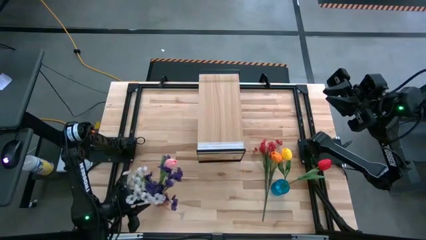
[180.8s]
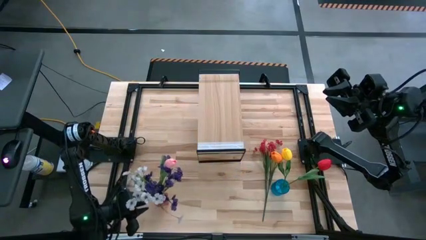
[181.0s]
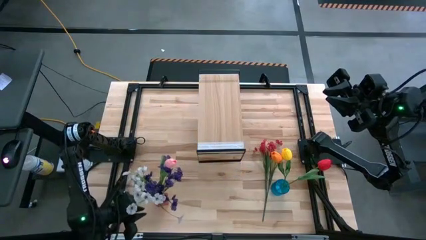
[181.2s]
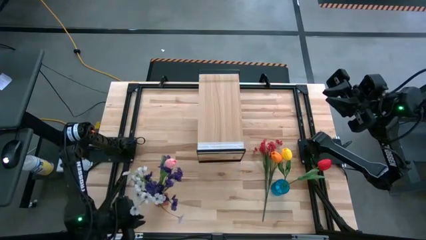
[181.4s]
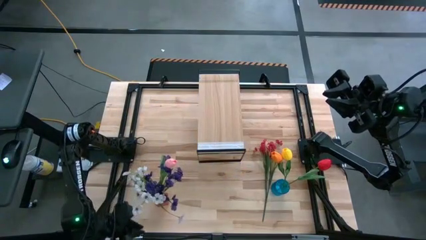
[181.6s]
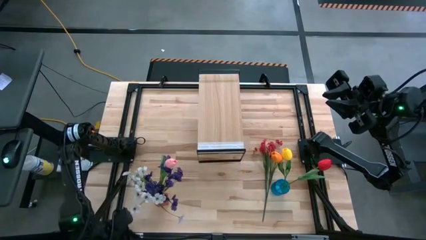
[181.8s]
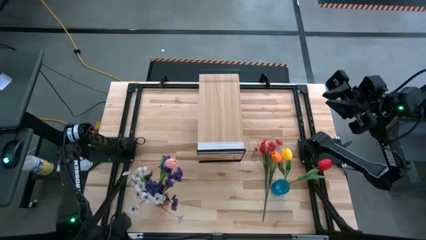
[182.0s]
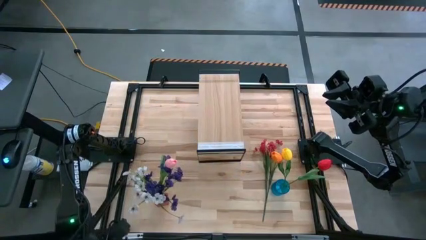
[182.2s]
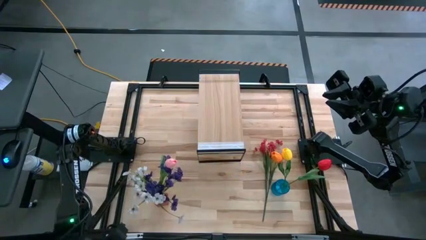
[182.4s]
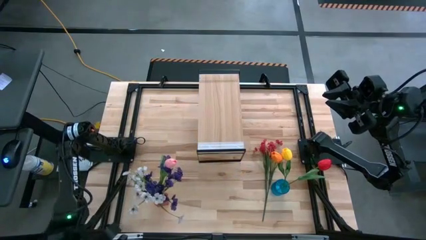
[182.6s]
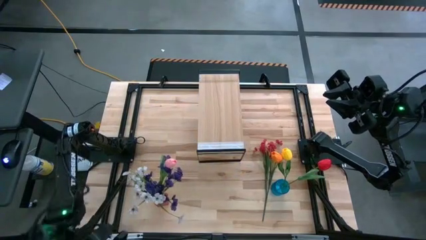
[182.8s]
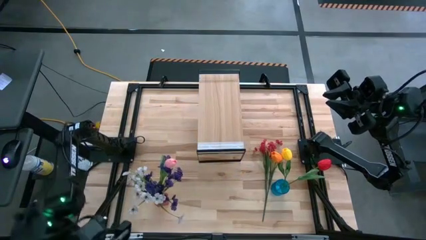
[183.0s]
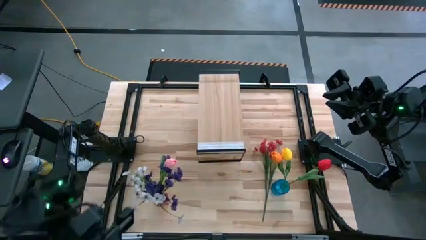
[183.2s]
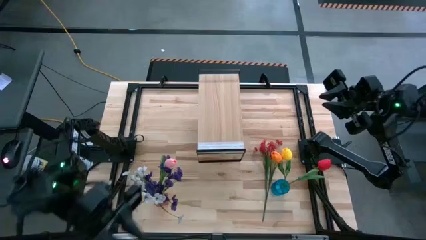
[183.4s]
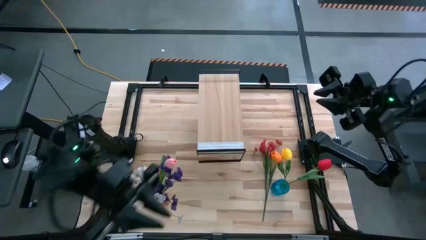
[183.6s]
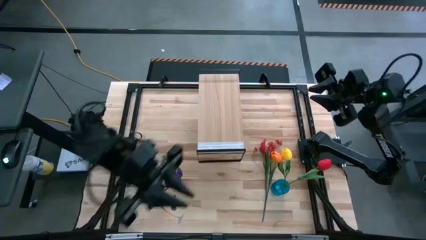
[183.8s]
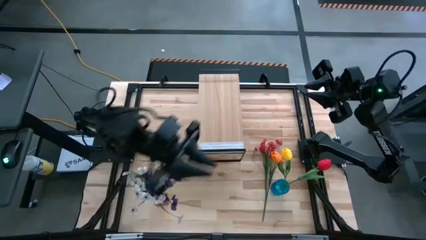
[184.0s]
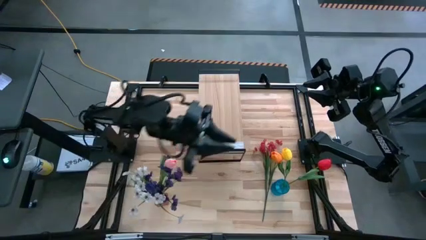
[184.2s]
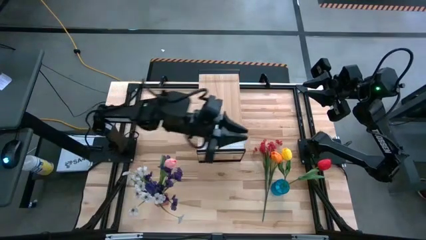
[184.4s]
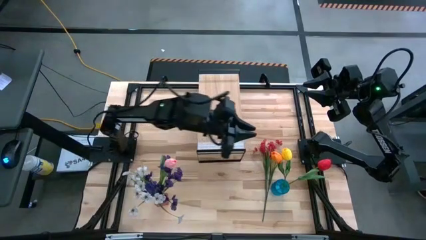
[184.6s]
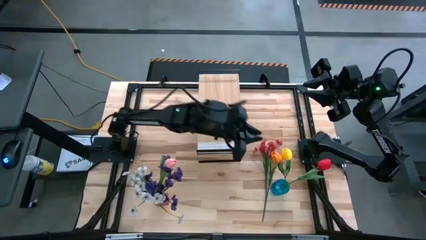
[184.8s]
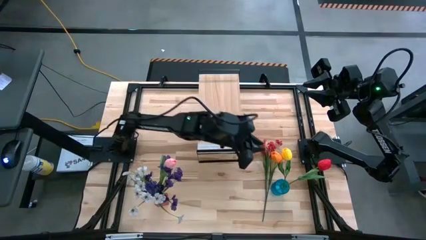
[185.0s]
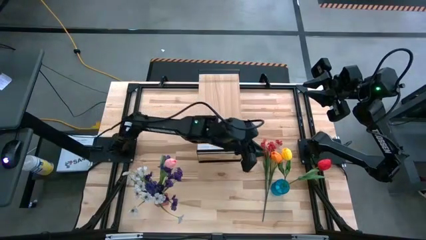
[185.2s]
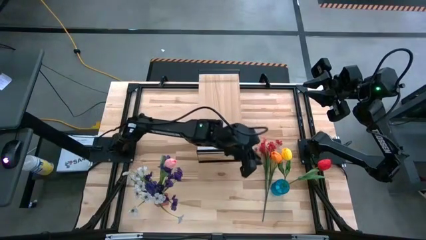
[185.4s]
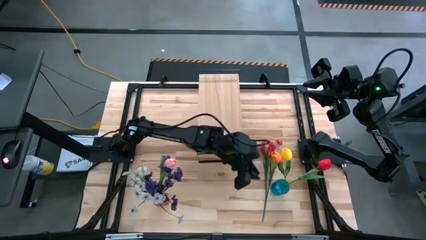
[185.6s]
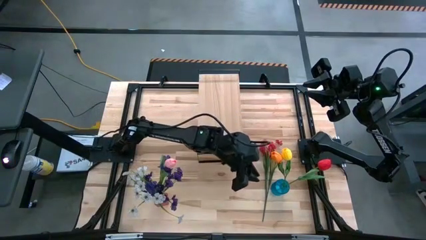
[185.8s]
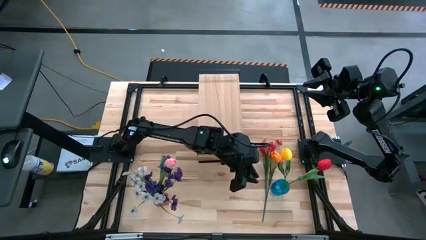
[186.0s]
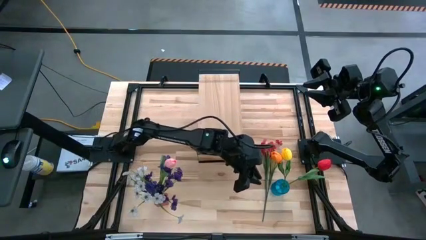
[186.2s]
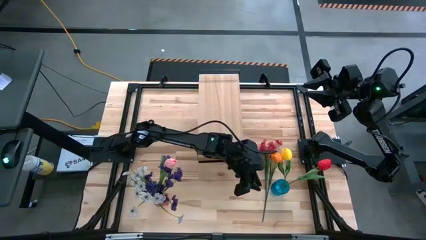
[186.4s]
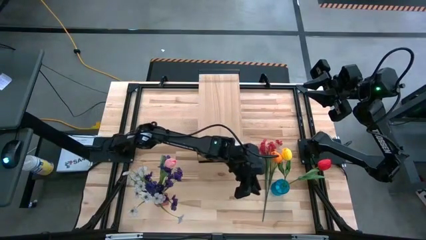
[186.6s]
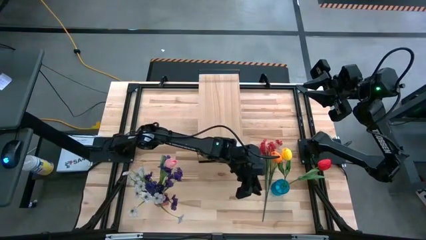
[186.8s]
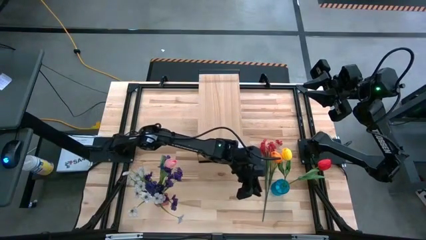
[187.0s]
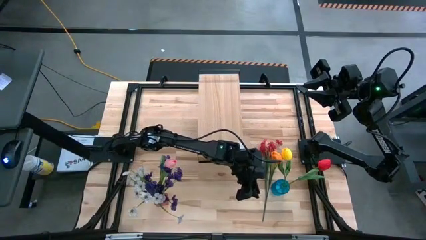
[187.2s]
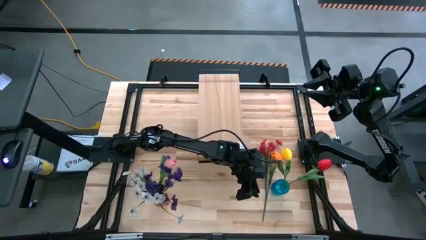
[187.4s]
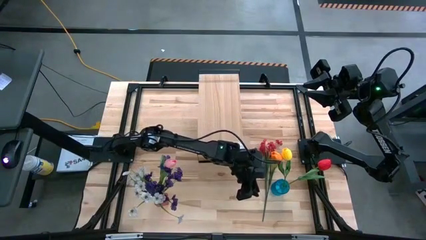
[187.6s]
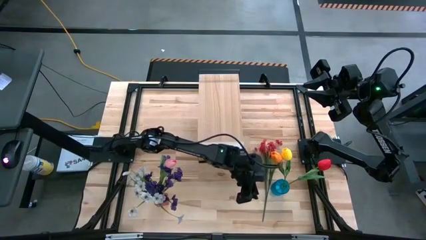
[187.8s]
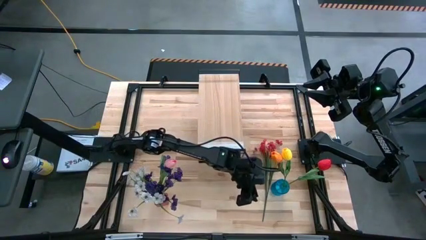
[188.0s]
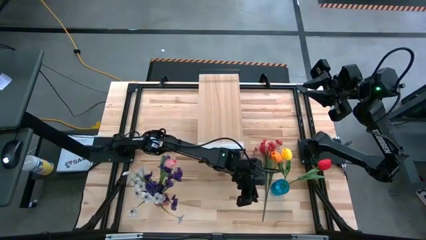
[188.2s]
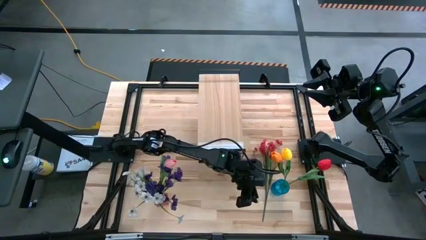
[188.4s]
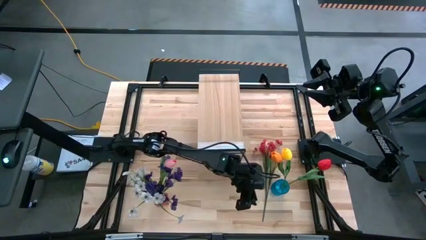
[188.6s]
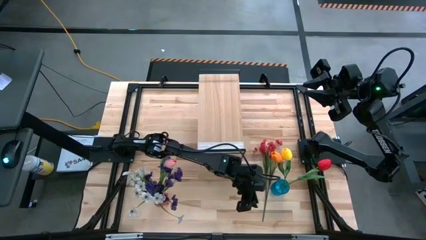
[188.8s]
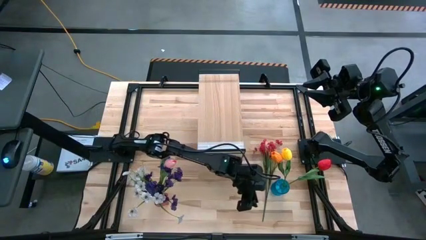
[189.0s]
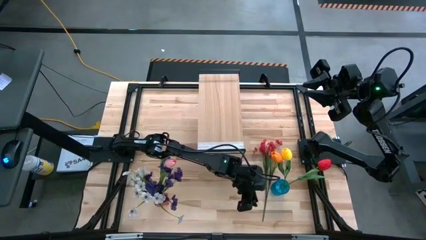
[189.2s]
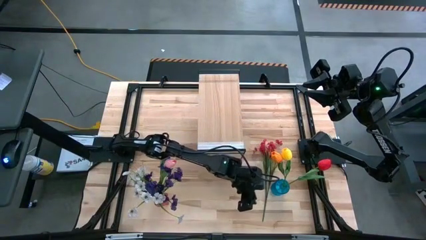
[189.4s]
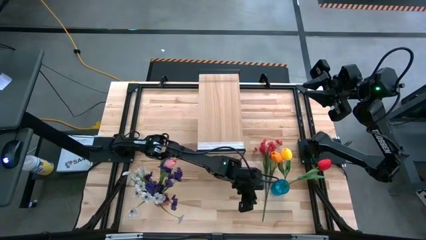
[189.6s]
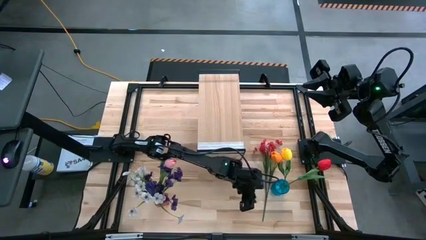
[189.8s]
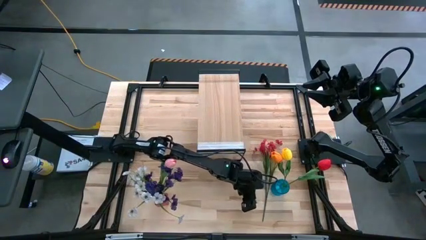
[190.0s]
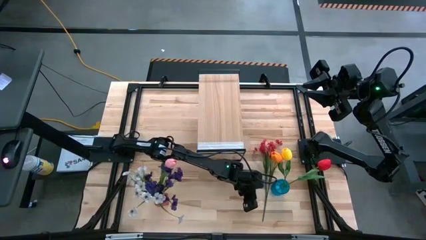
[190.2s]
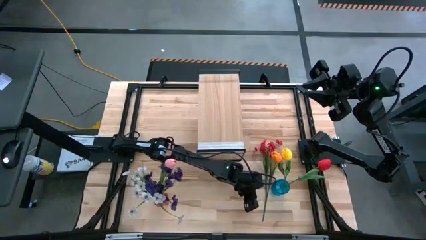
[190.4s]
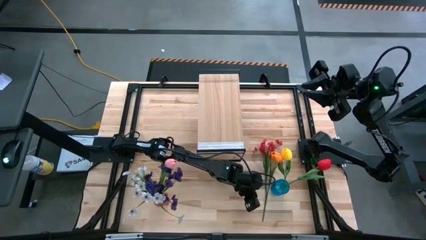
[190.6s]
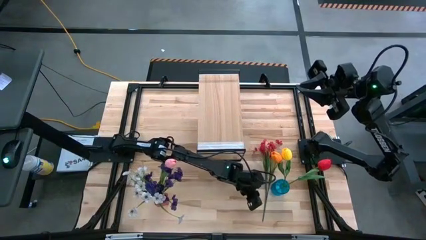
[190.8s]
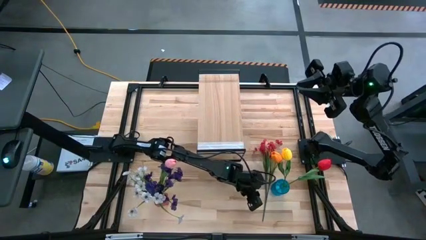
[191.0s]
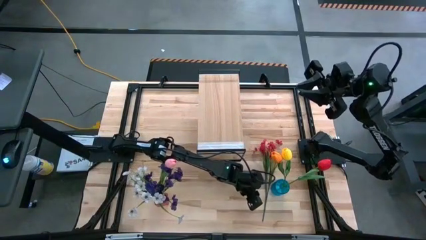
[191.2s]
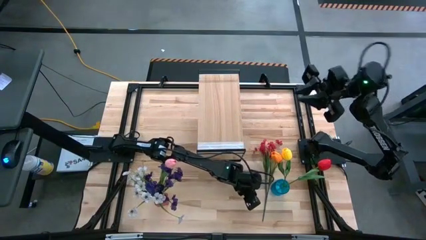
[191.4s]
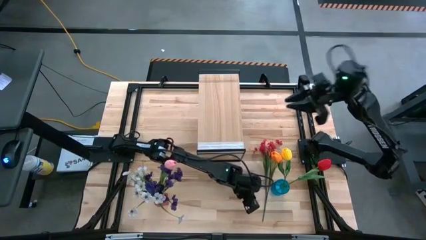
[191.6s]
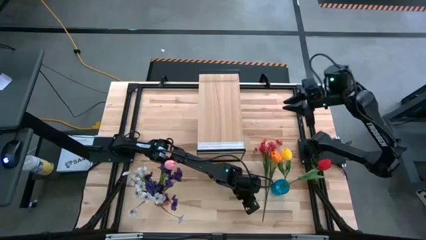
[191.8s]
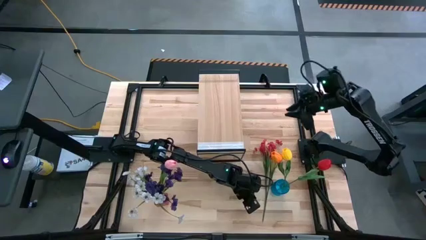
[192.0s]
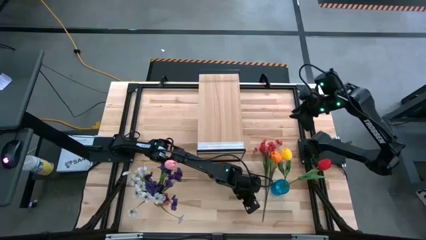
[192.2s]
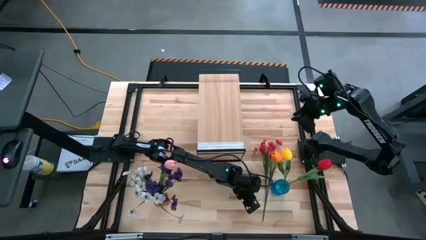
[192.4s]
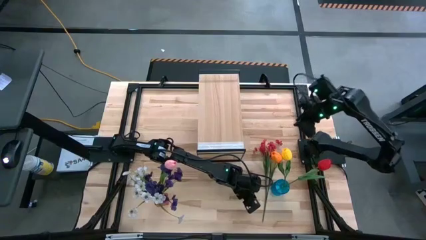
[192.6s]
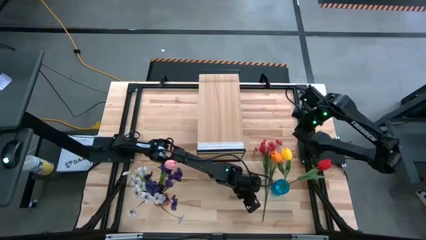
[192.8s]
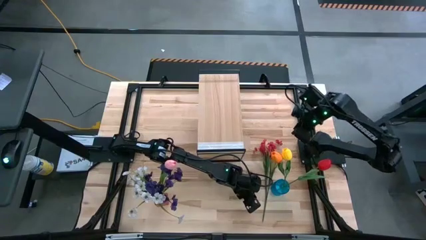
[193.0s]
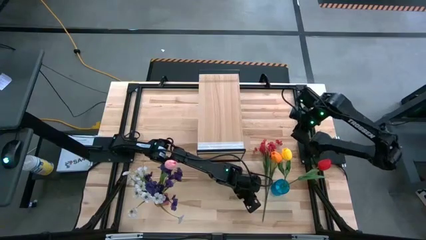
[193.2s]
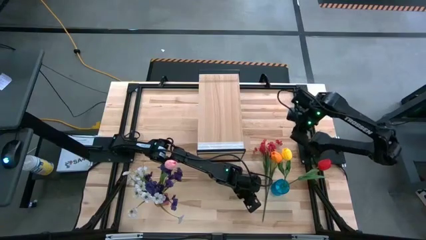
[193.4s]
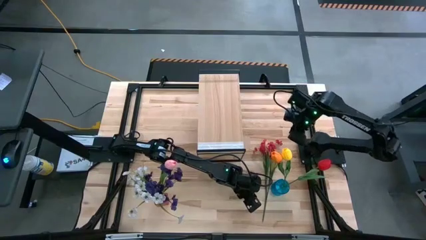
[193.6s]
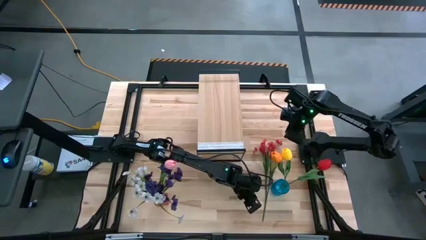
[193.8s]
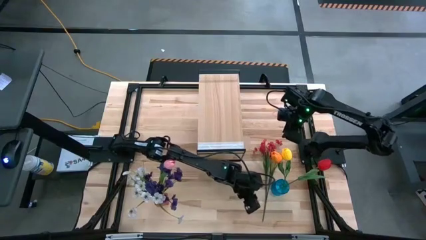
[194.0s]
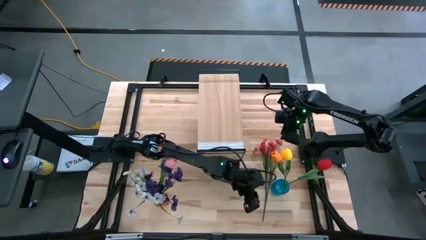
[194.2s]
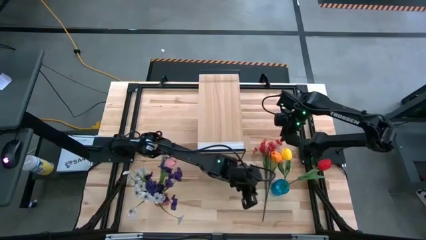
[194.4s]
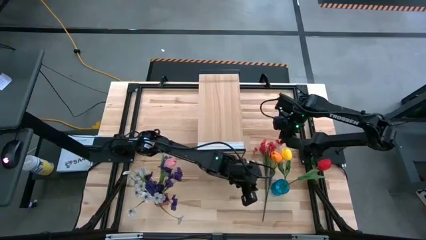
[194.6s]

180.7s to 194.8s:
Task: Pick and place flowers into a vace then onto a shelf
Put the red flowers into the blue vase

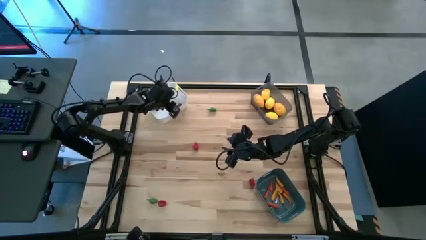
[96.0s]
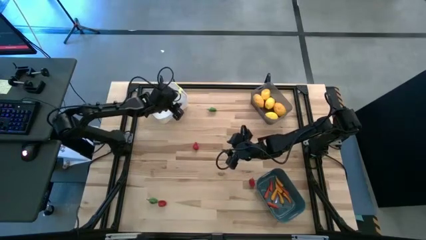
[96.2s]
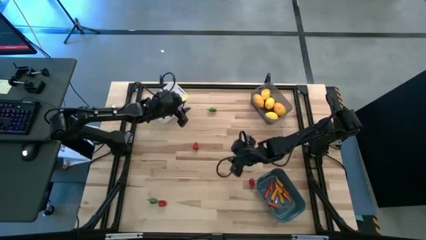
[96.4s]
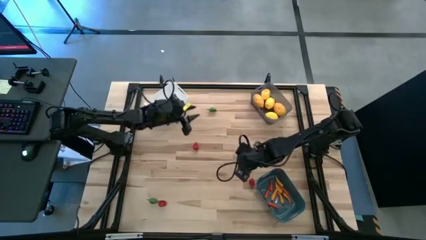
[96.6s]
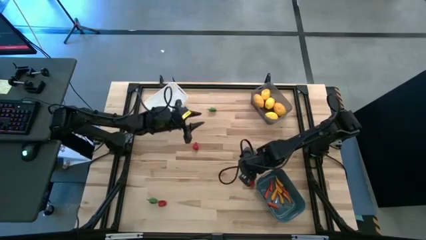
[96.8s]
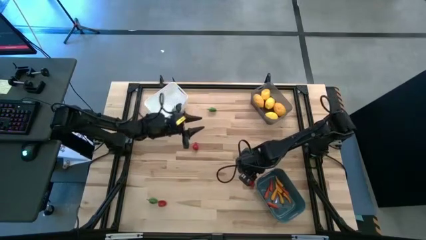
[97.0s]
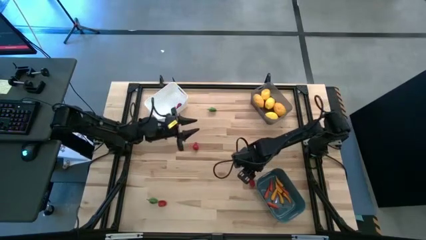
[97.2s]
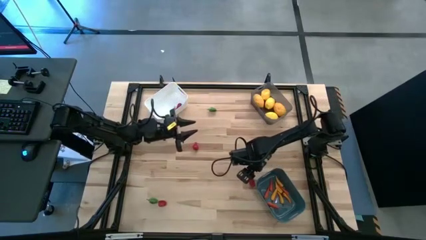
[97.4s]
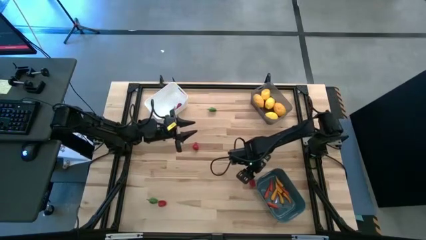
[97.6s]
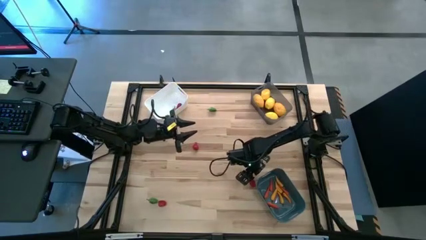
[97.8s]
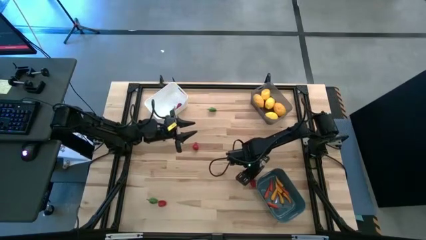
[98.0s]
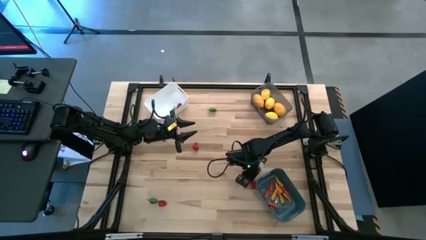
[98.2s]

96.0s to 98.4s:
Task: Sort produce into baskets
Put the red chili pepper into the white bin
